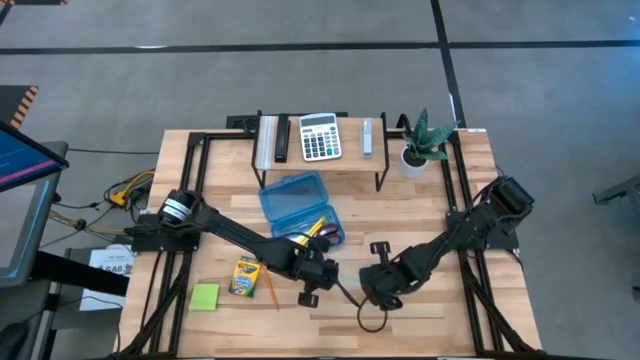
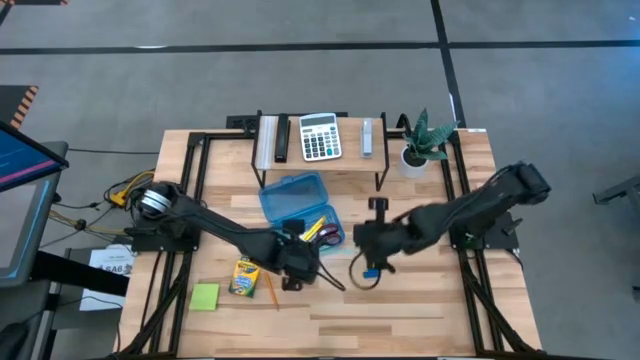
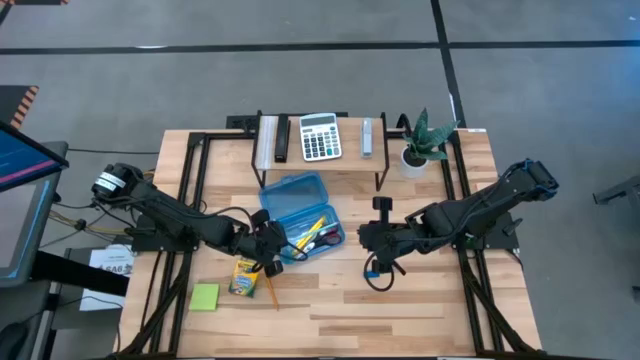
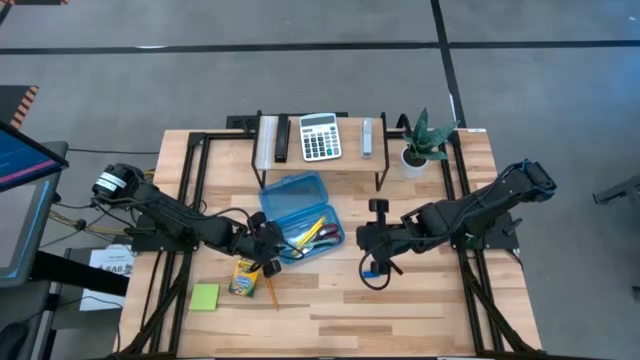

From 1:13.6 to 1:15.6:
Task: Pack school essentials
Put the blue pencil into the supply box

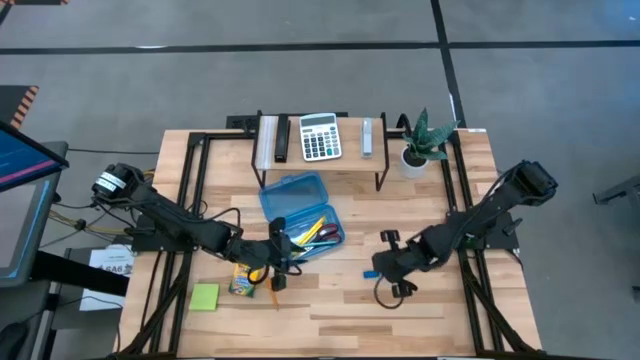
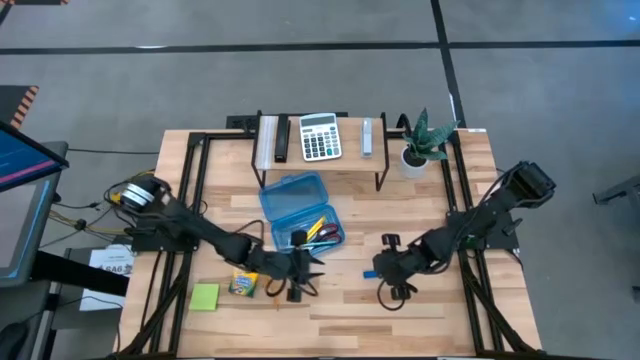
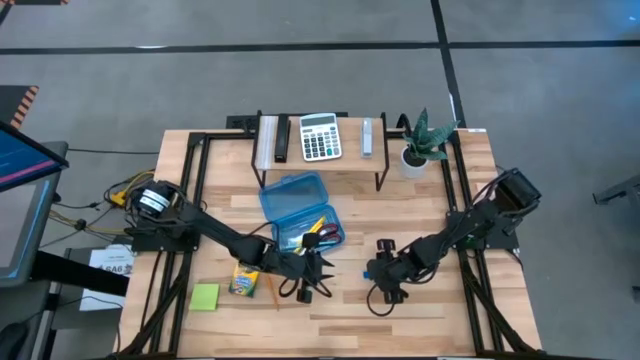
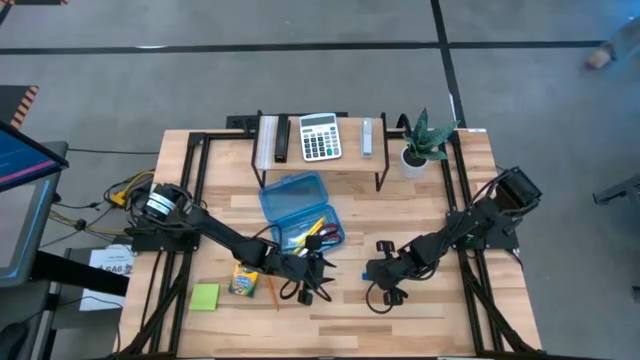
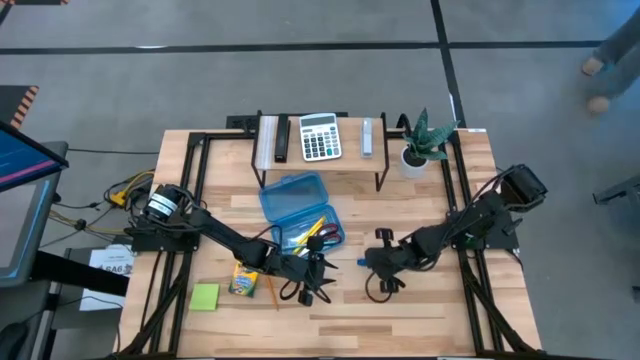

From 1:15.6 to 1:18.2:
Put the blue eraser into the supply box

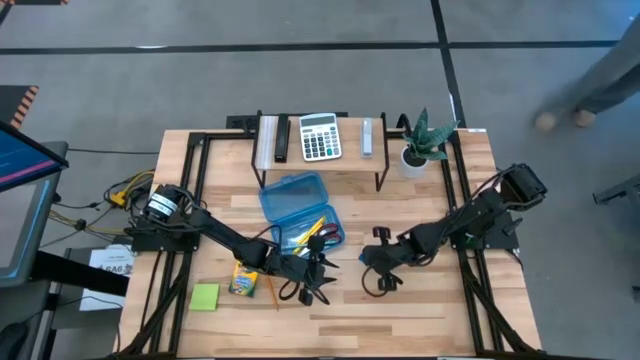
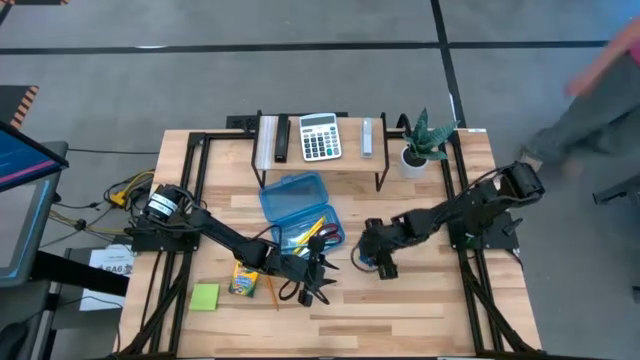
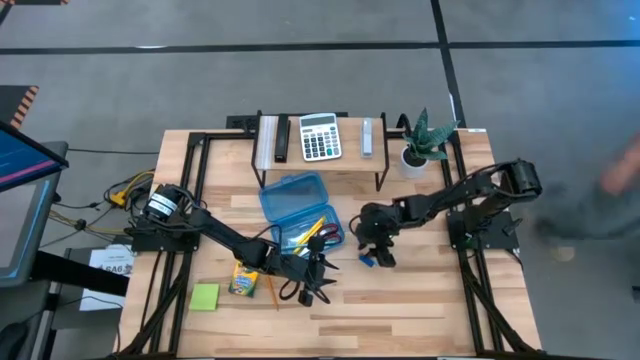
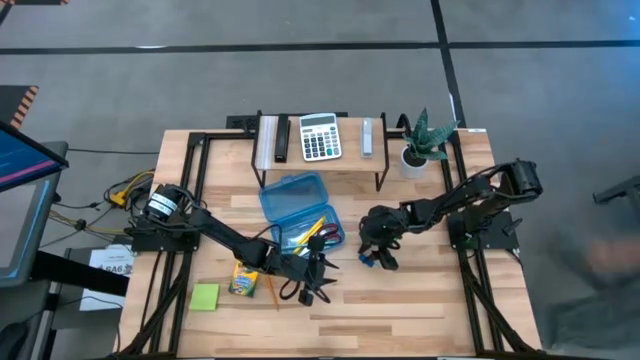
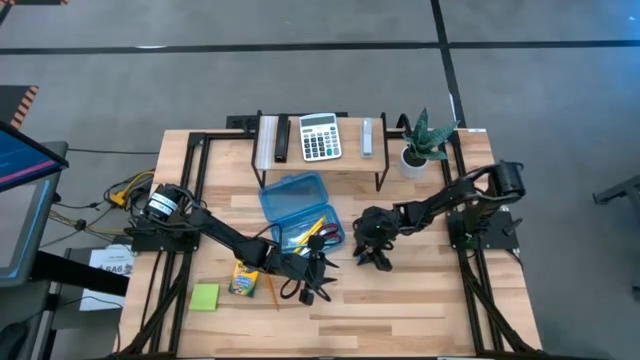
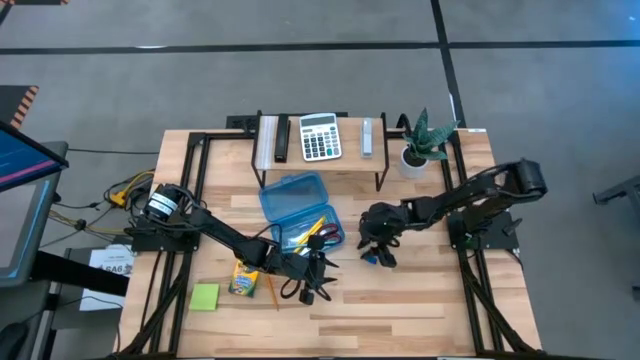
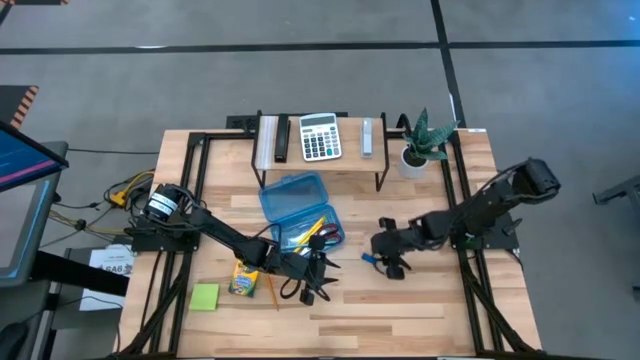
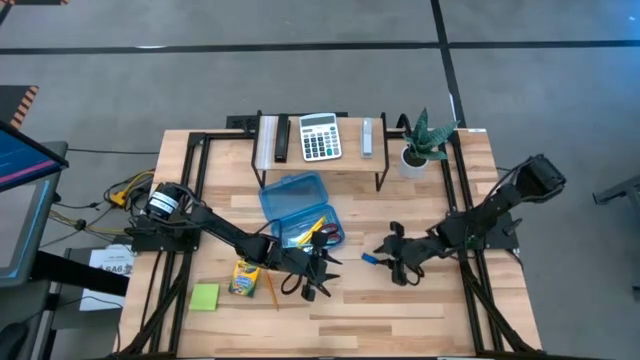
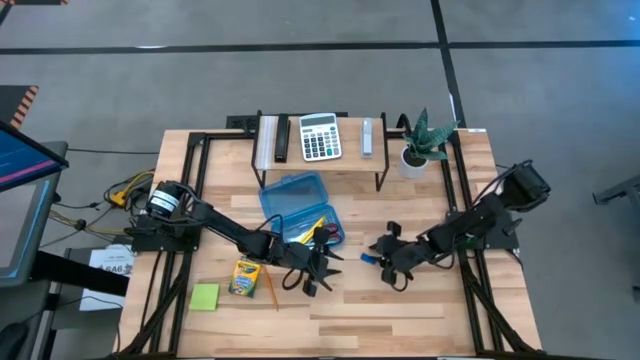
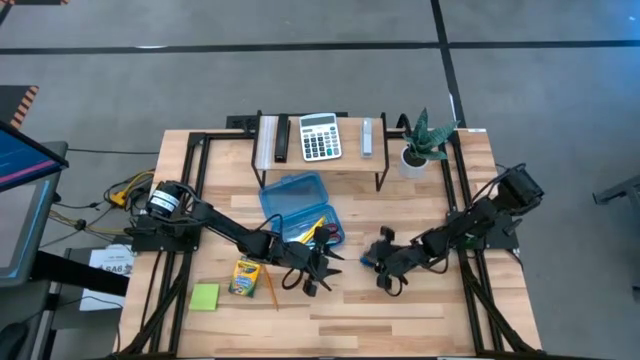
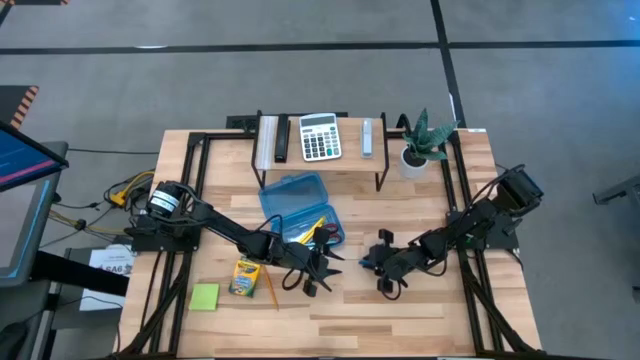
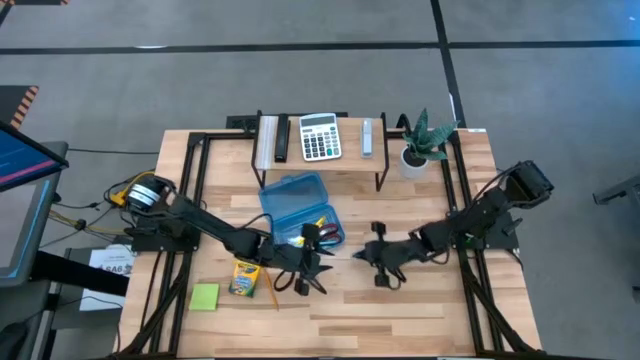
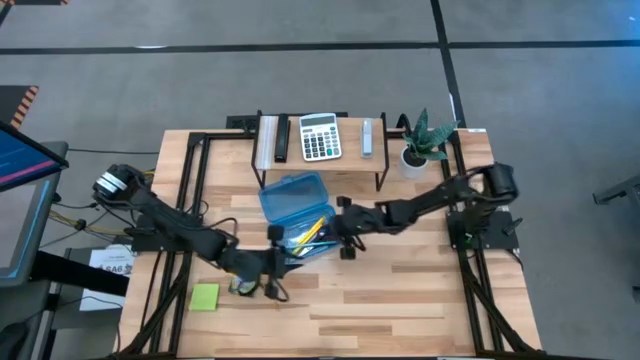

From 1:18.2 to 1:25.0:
Put the blue eraser into the supply box

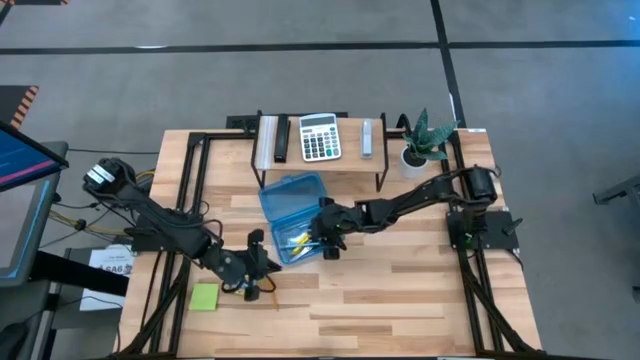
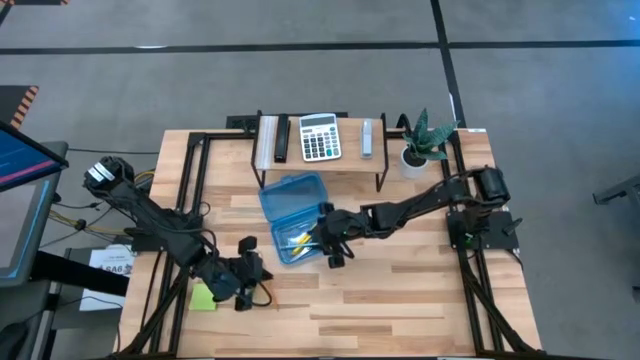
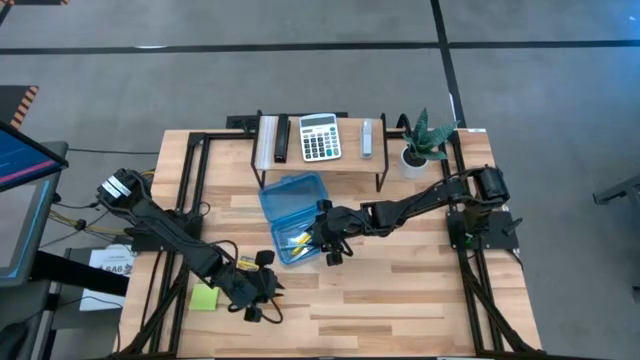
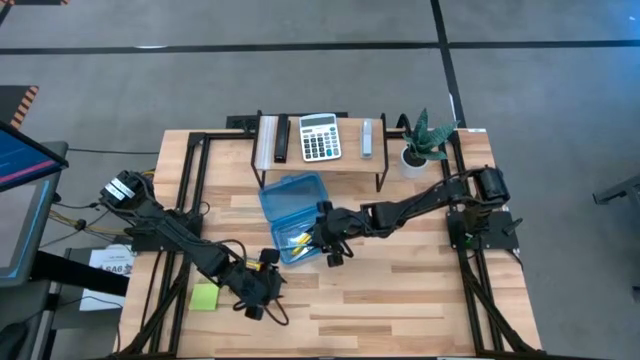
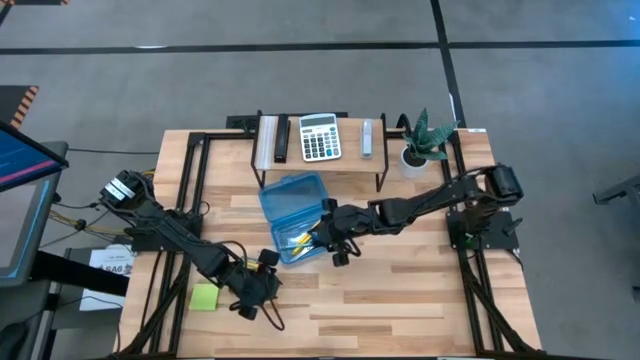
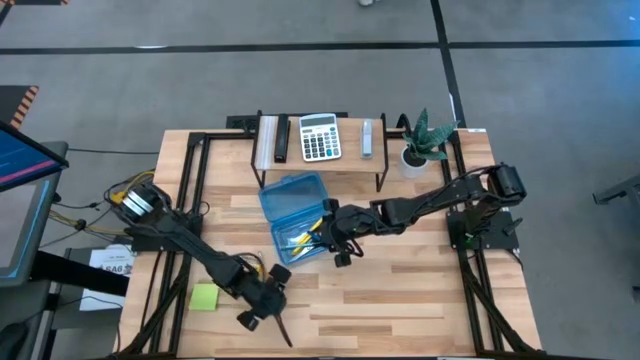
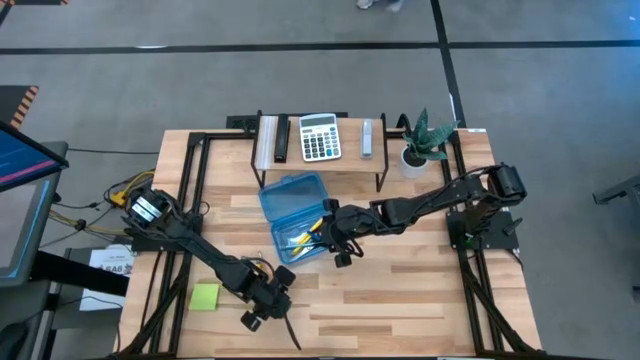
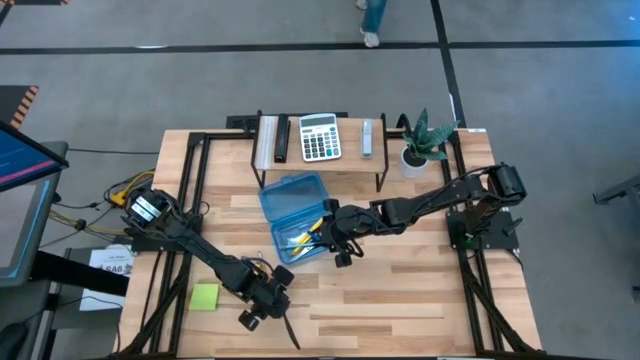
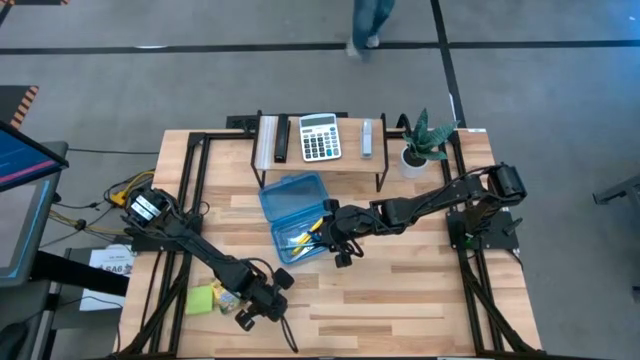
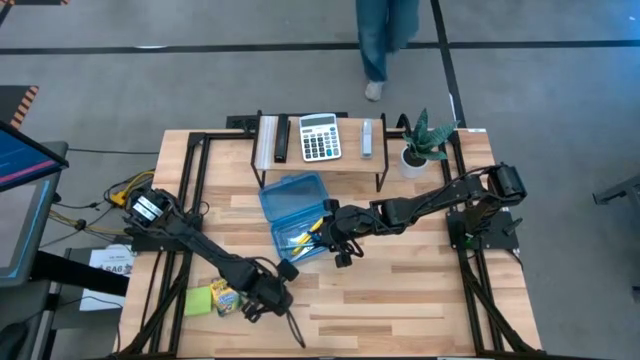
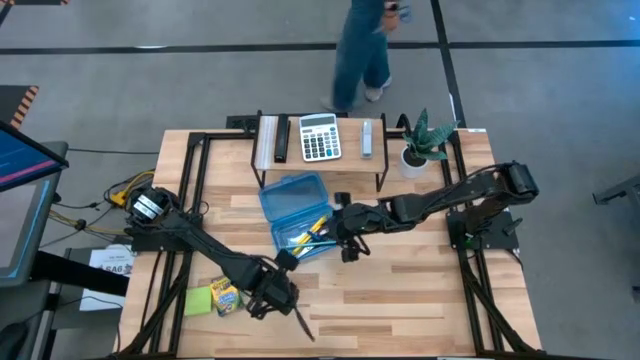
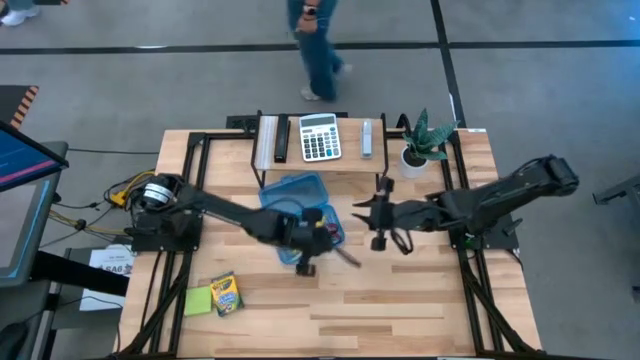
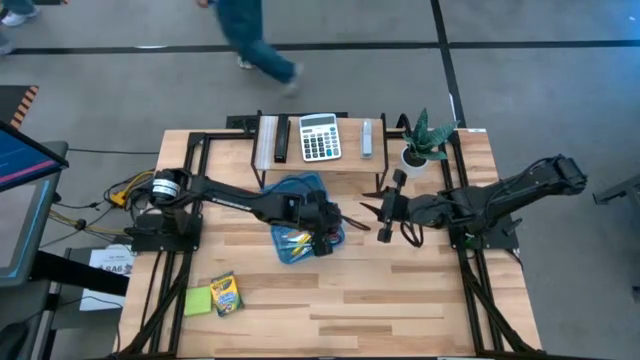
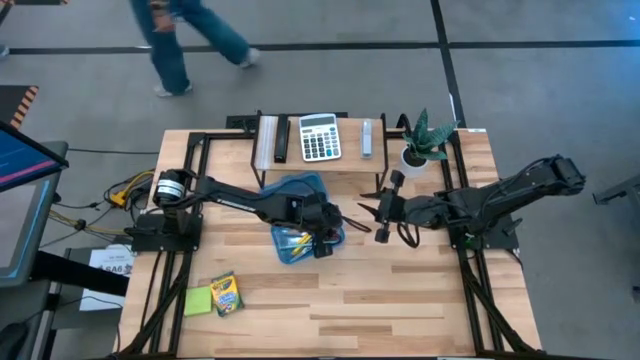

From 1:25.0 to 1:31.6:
Put the orange pencil into the supply box

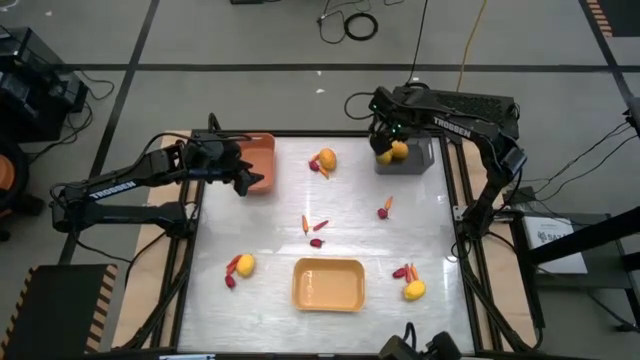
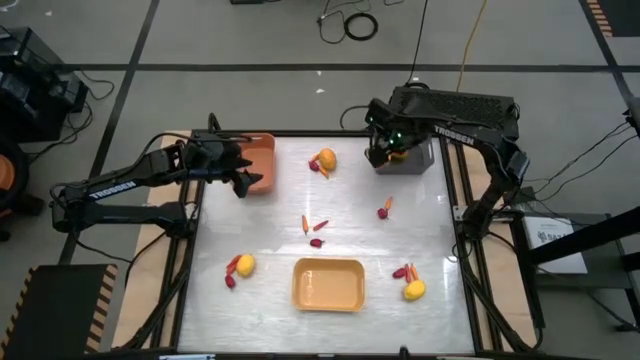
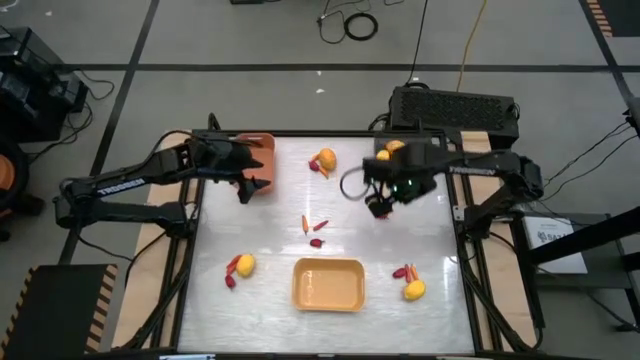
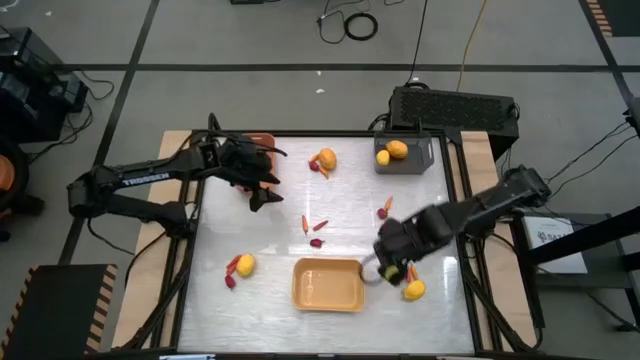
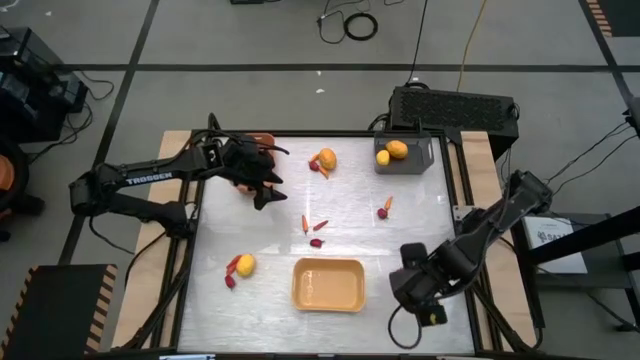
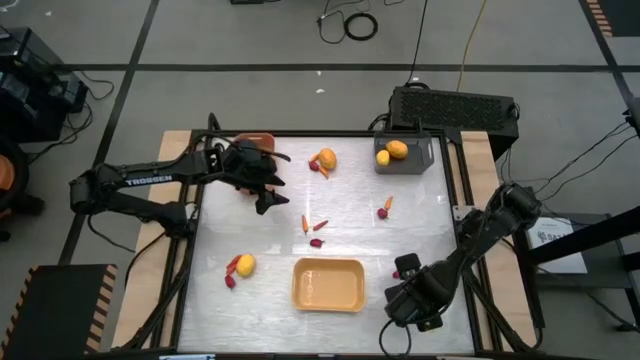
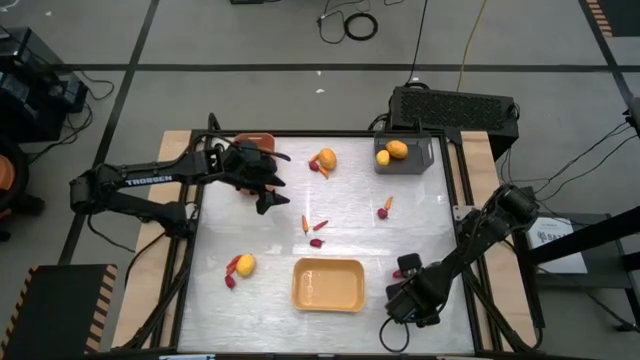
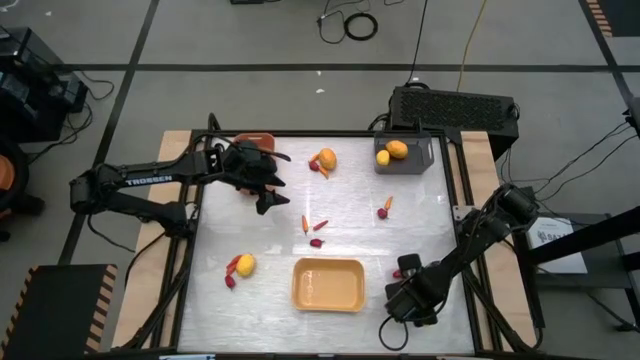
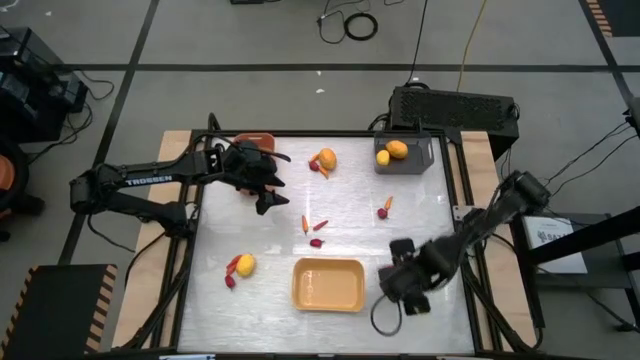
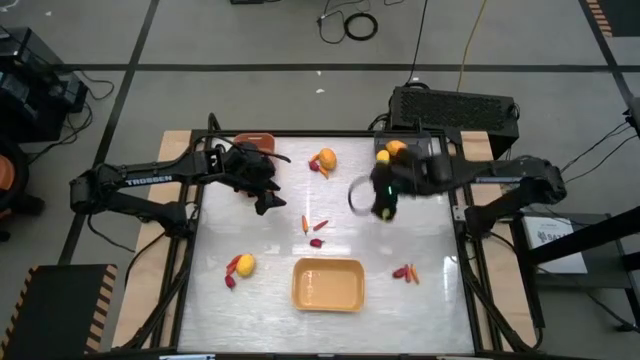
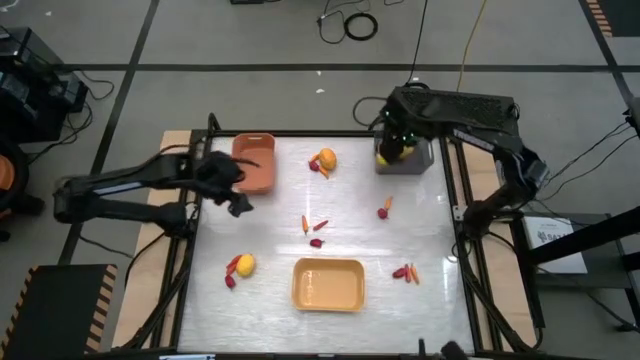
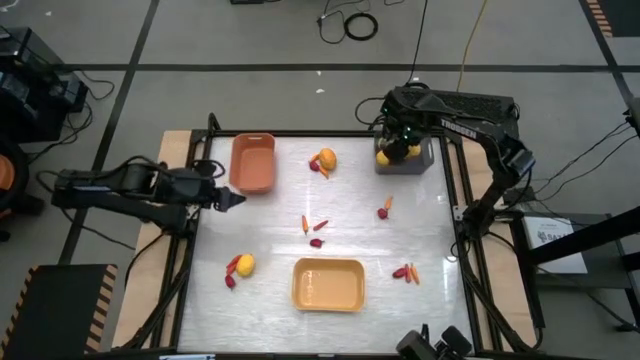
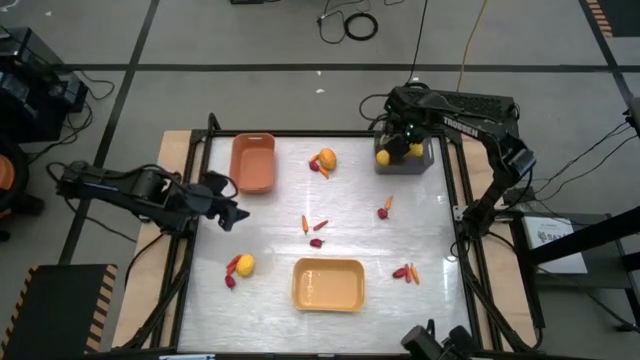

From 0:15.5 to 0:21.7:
Task: Sort produce into baskets
Put the lemon into the gray bin
